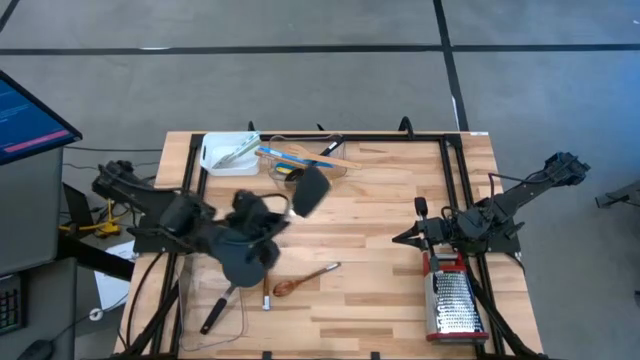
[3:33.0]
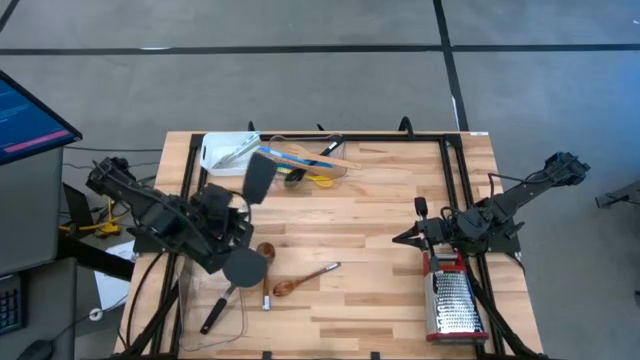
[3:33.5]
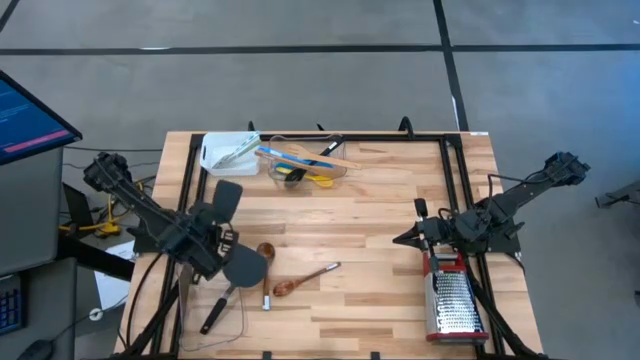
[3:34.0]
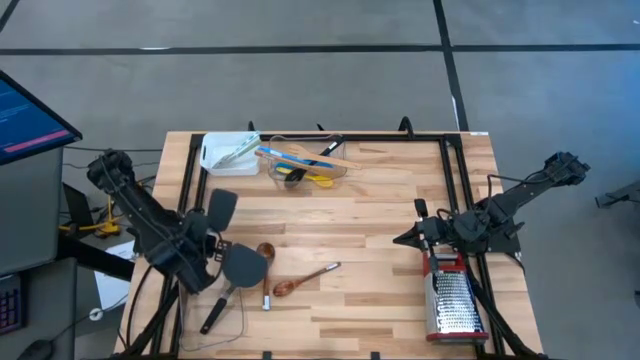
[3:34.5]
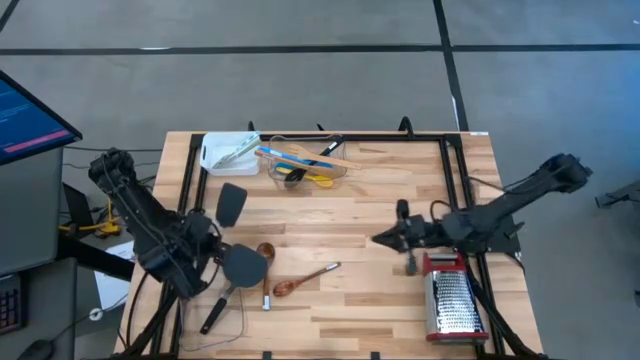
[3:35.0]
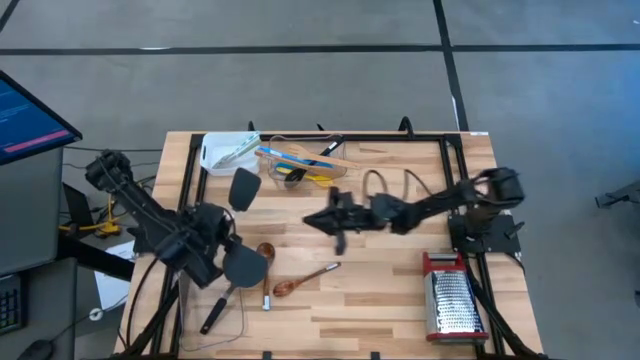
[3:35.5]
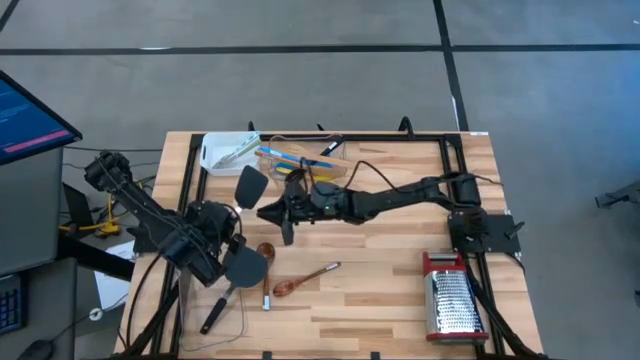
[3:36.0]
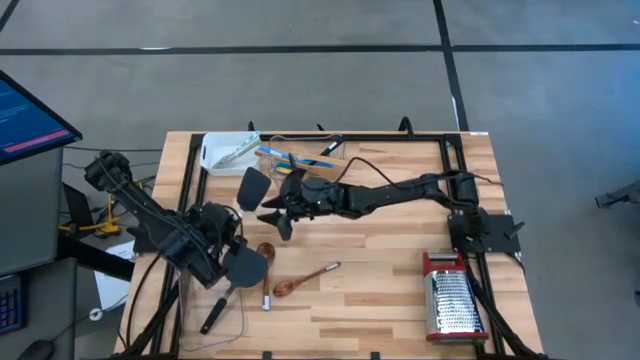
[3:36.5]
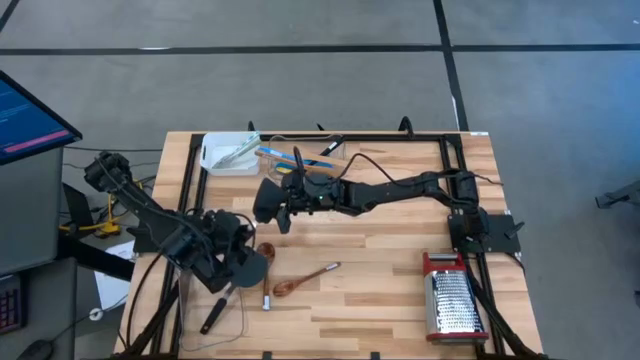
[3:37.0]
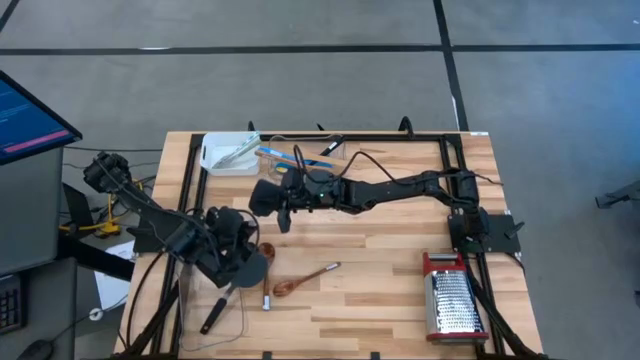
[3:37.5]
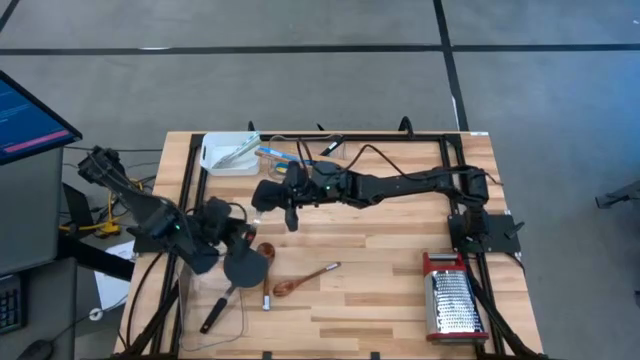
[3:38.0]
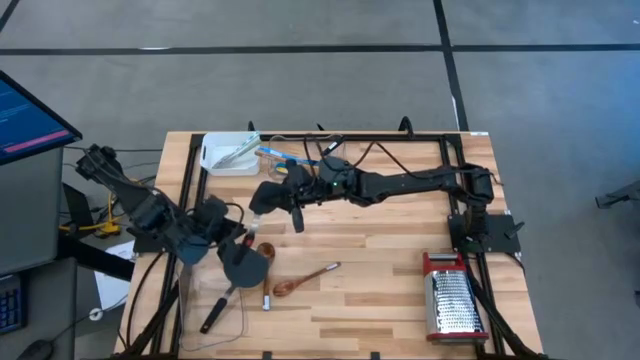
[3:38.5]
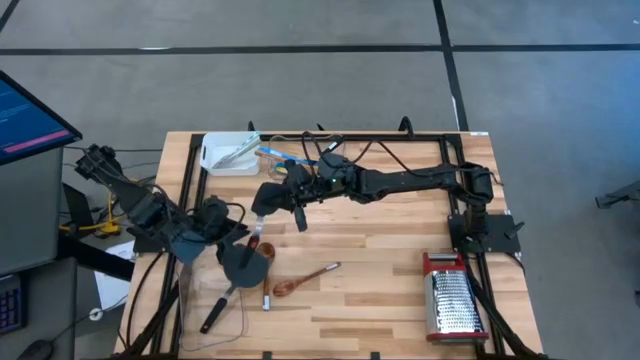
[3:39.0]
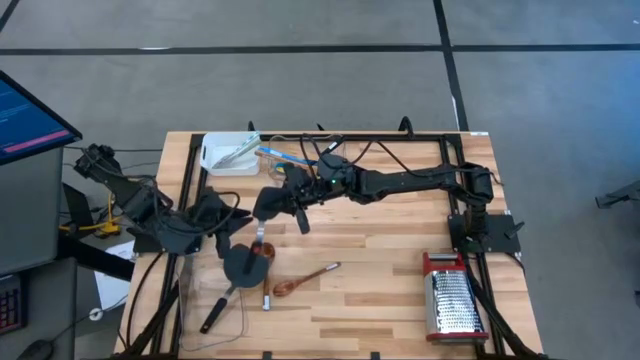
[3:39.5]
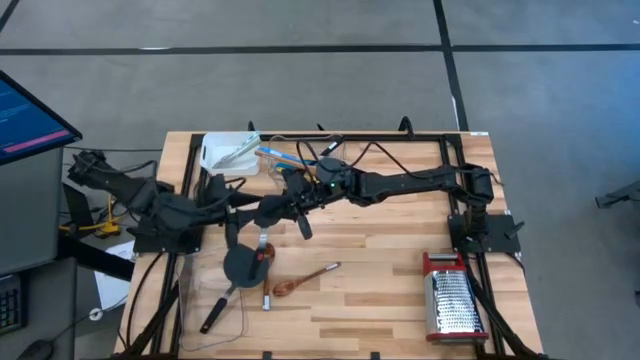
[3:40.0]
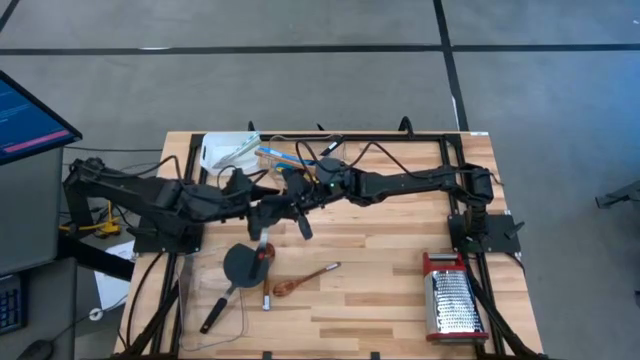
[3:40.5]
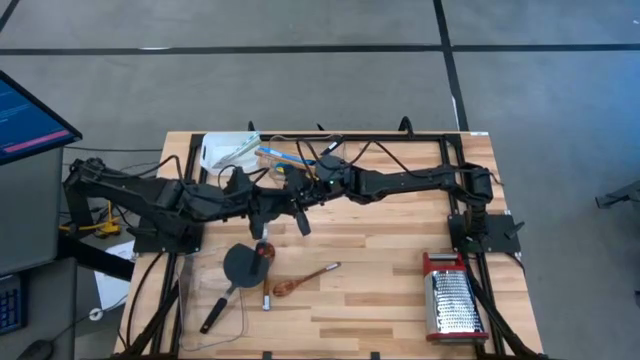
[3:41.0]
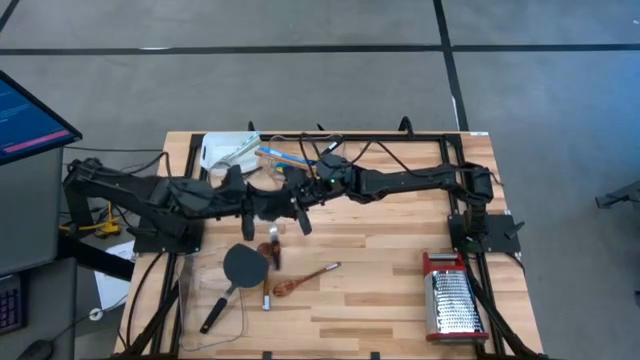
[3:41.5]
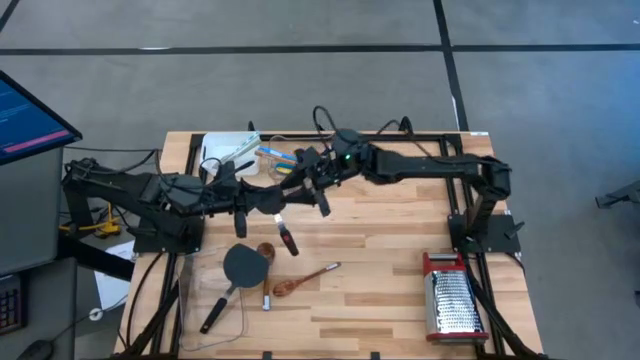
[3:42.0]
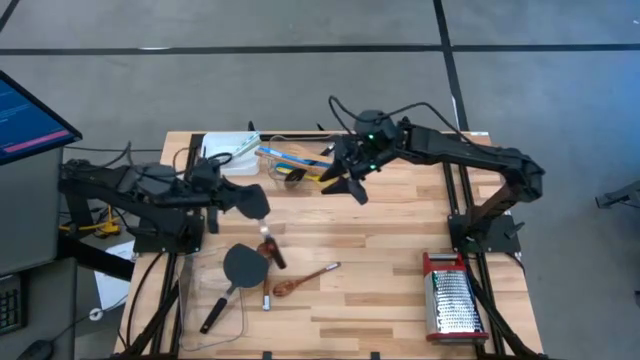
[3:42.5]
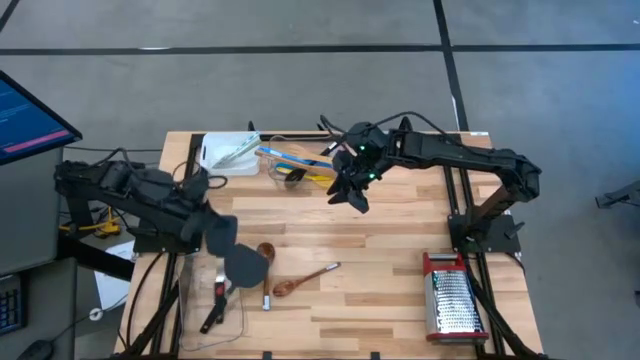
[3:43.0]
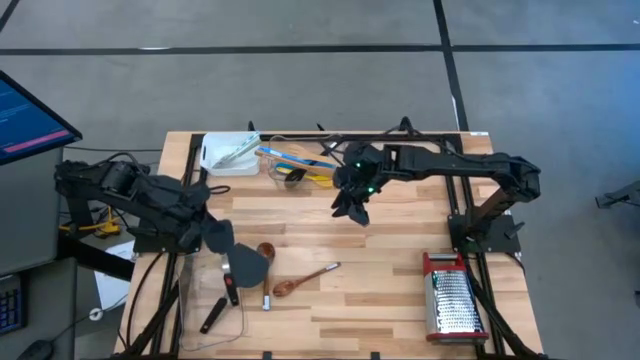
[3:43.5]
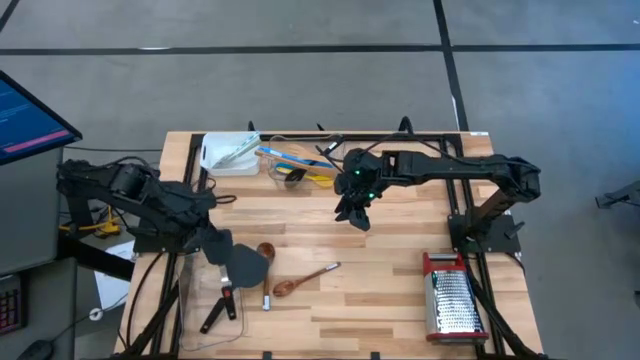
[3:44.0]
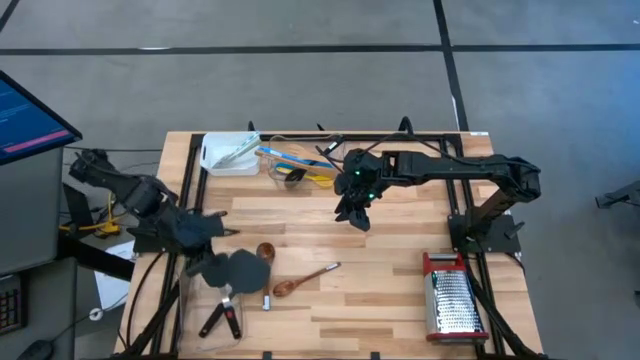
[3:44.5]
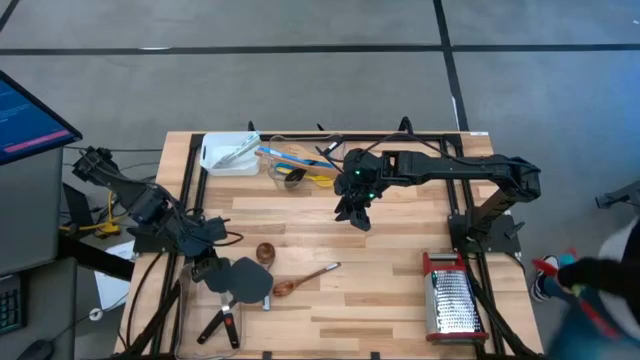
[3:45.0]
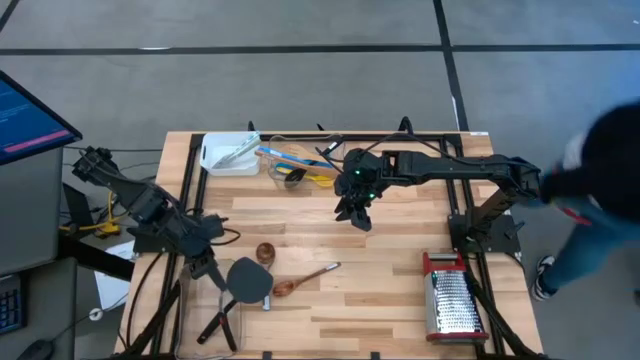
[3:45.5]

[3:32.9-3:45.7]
Task: Pick & Place Kitchen Items
Put the black slotted spatula into the bottom transparent bin

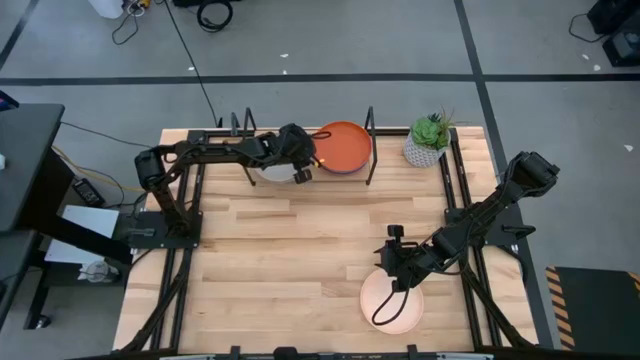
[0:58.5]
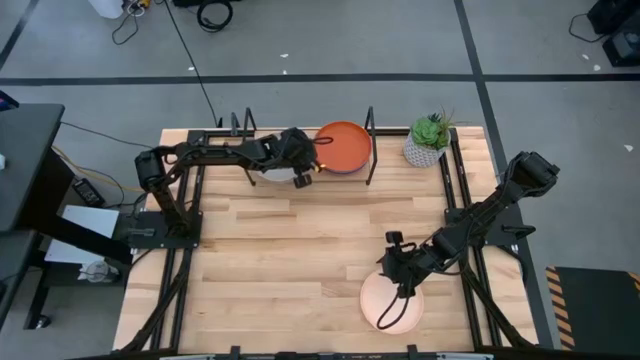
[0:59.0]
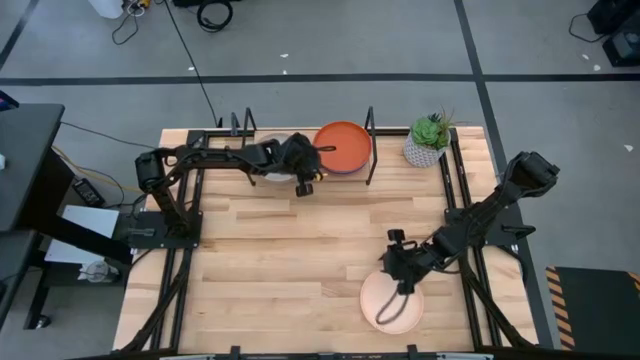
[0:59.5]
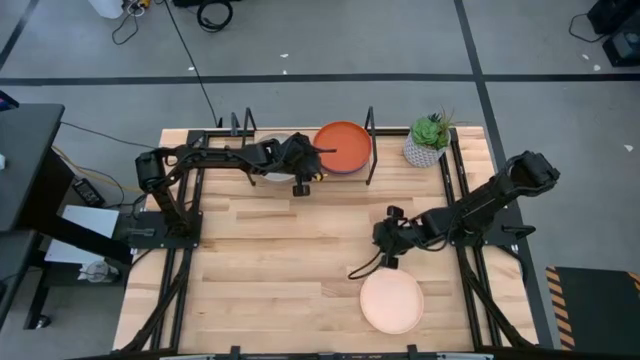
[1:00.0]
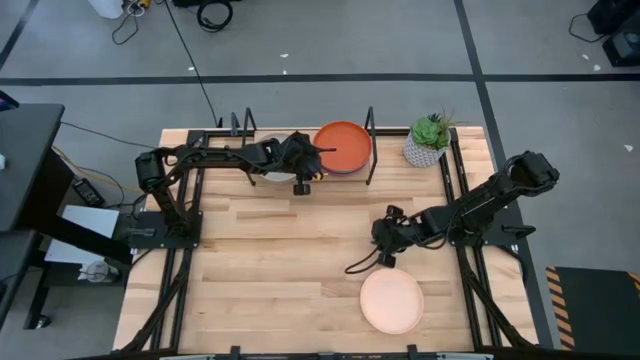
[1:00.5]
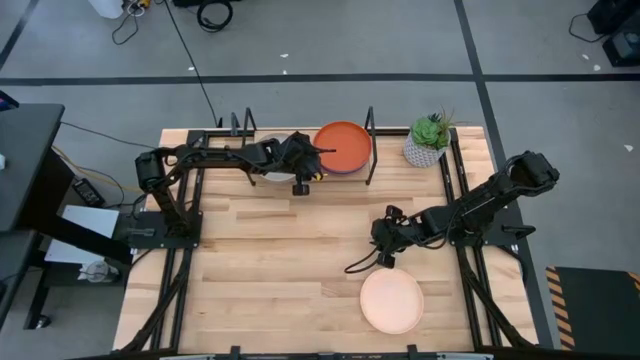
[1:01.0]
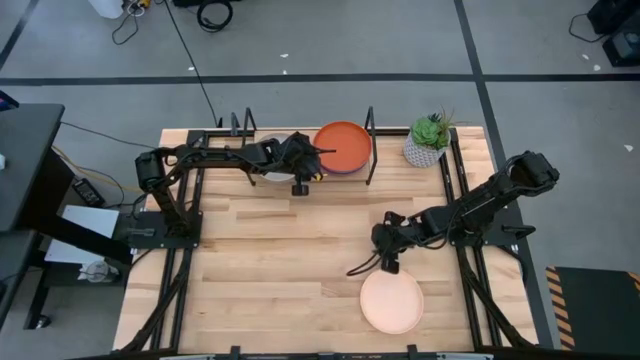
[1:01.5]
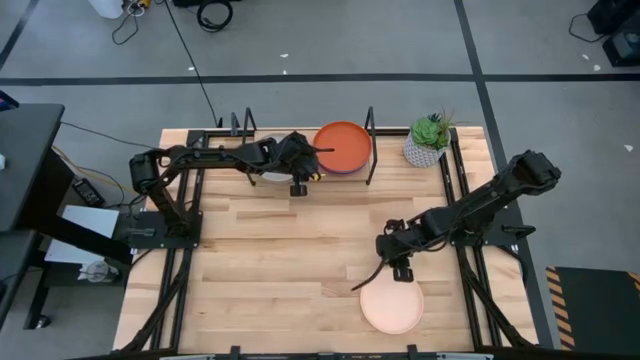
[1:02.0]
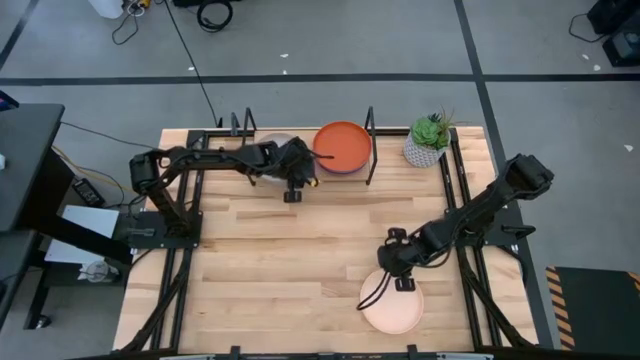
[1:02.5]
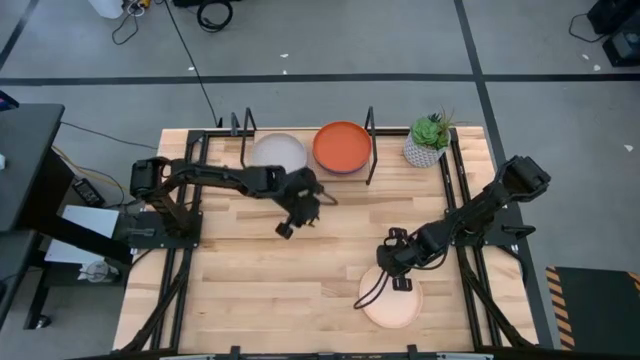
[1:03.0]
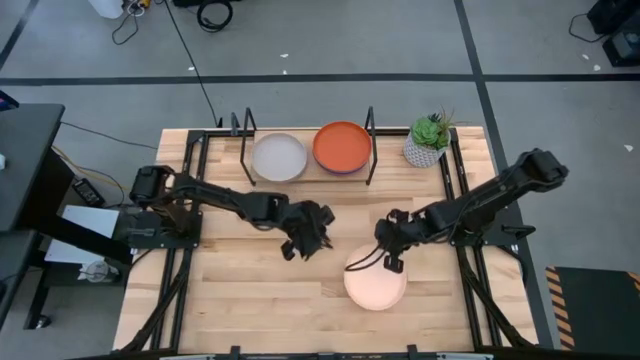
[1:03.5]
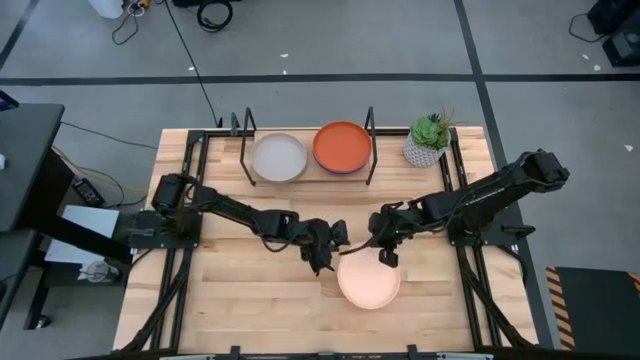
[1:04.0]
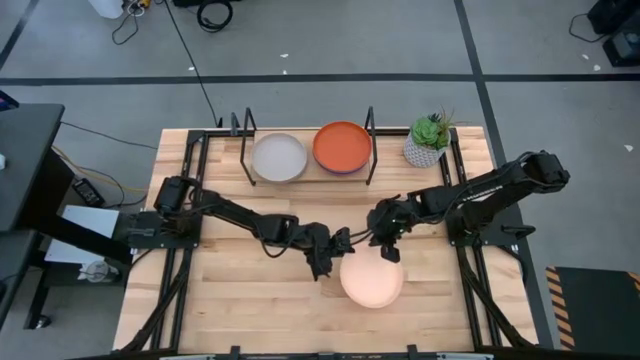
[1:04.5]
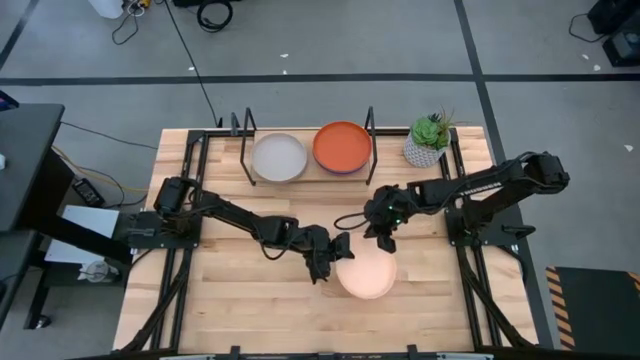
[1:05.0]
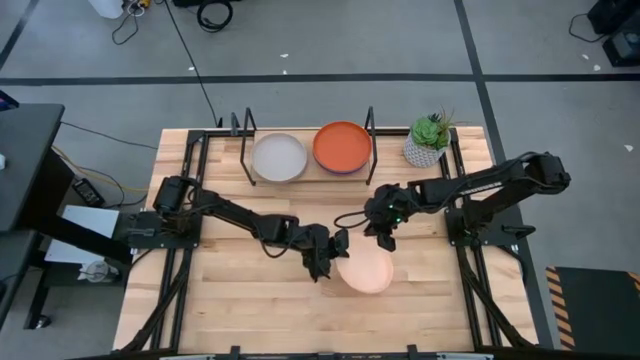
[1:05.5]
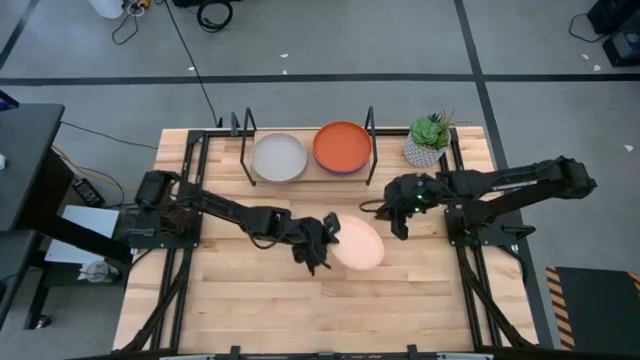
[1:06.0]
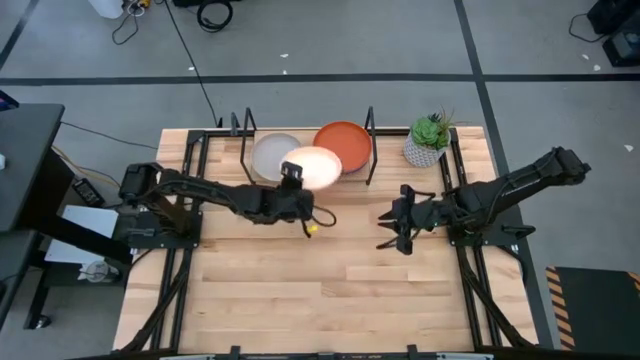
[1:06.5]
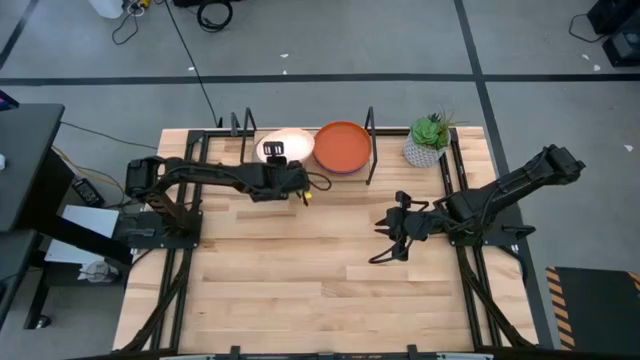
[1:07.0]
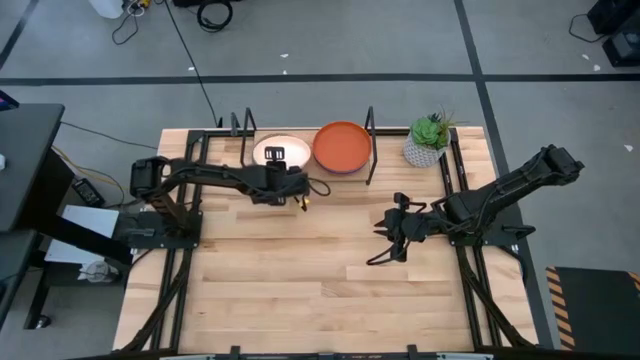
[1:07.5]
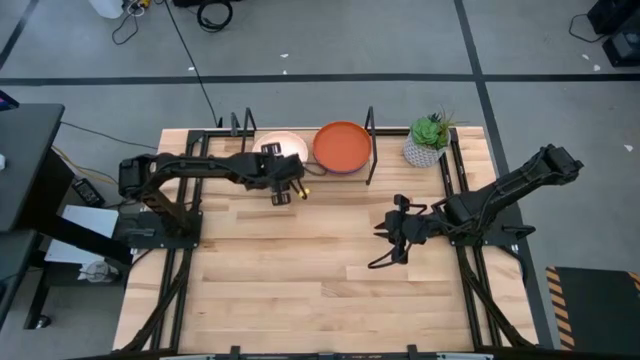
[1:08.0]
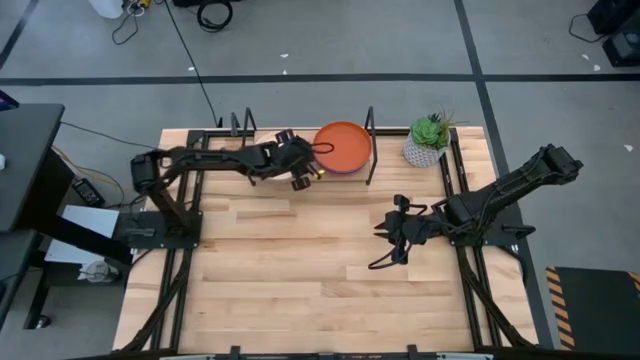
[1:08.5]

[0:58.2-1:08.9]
Task: Place and stack plates onto a shelf
Stack the light orange plate on top of the gray plate on the shelf
